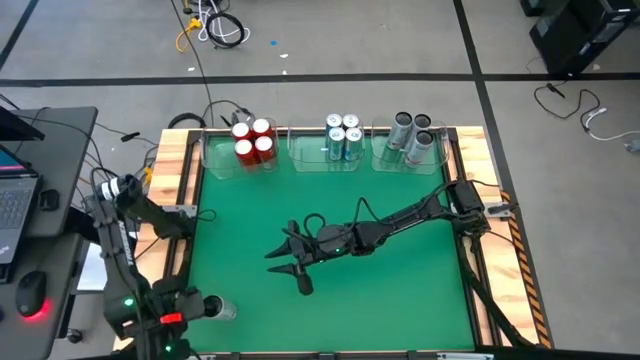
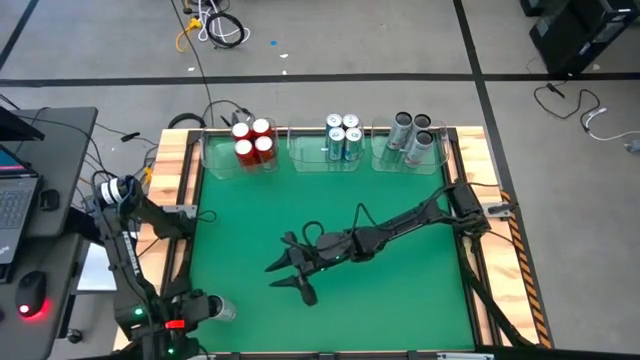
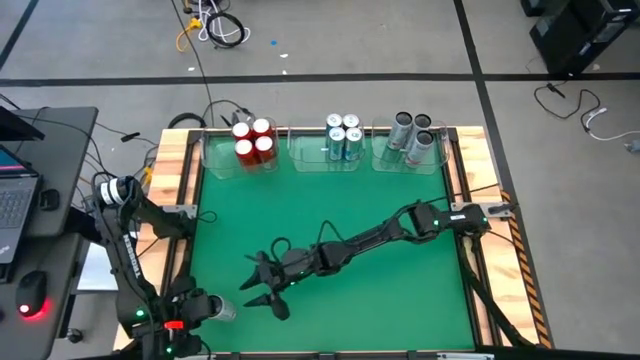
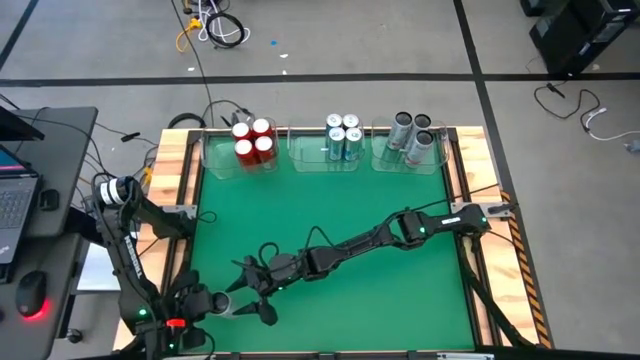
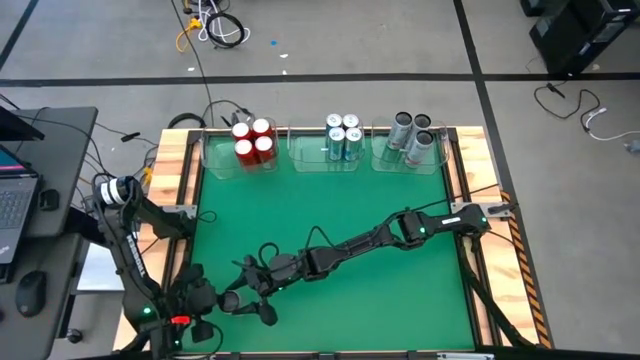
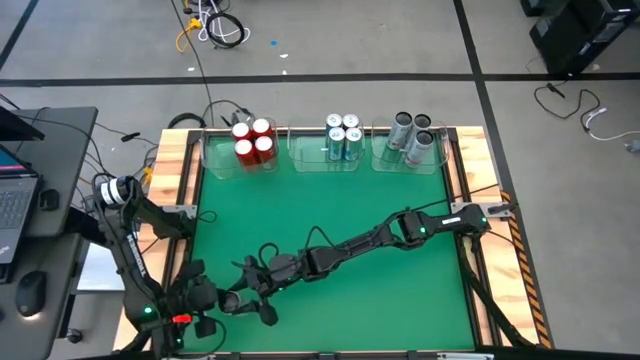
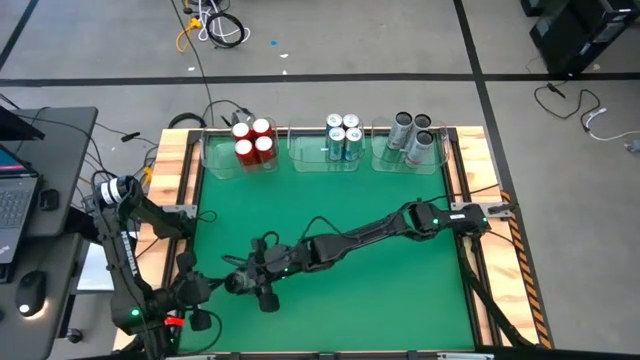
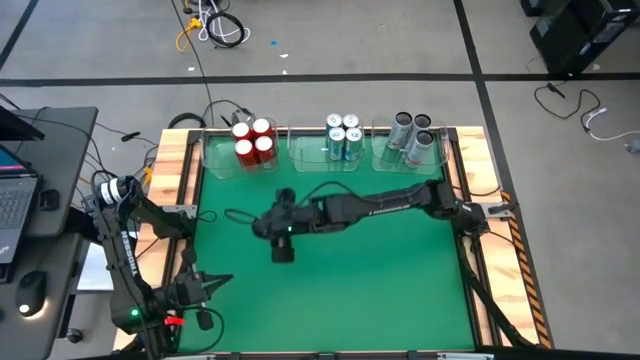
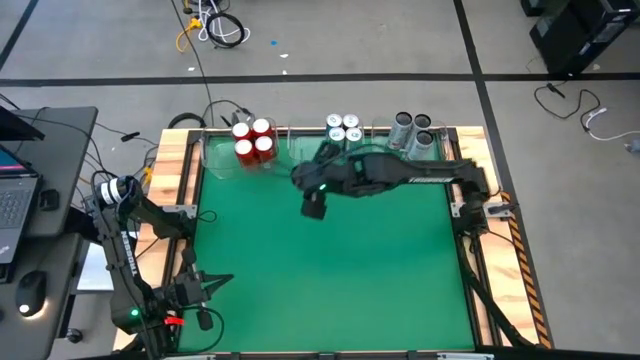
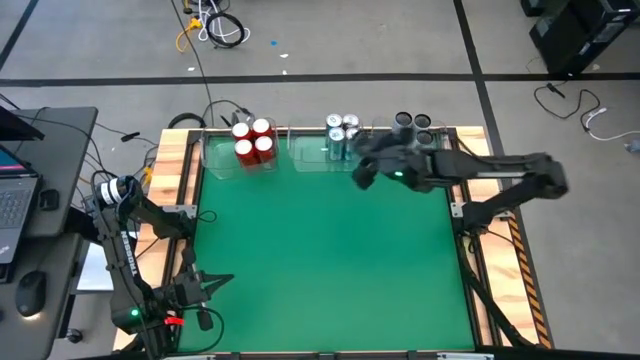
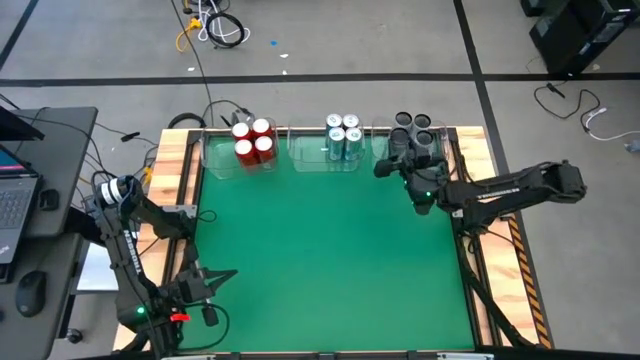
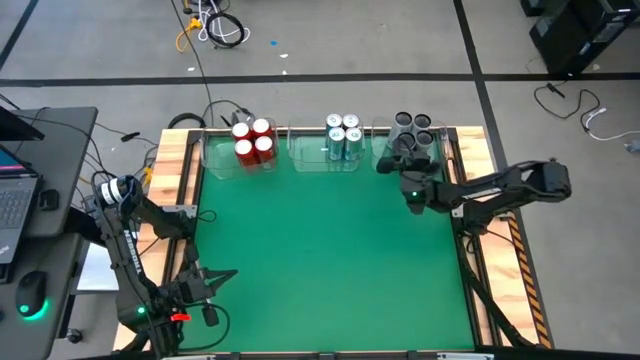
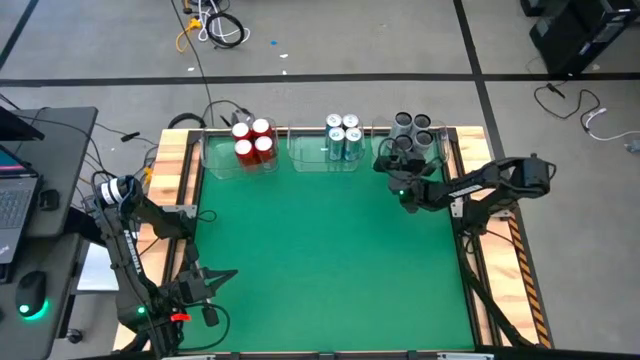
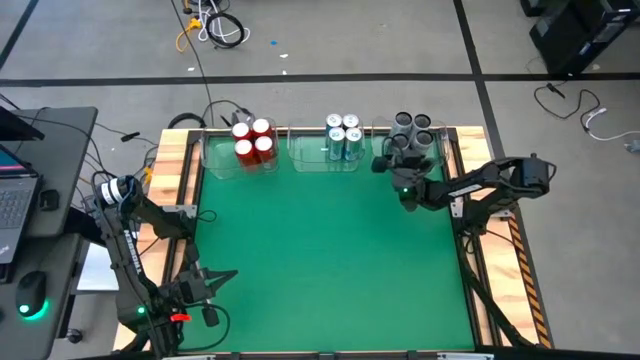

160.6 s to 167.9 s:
Task: Sort soda cans
Put the white soda can into the transparent right bin

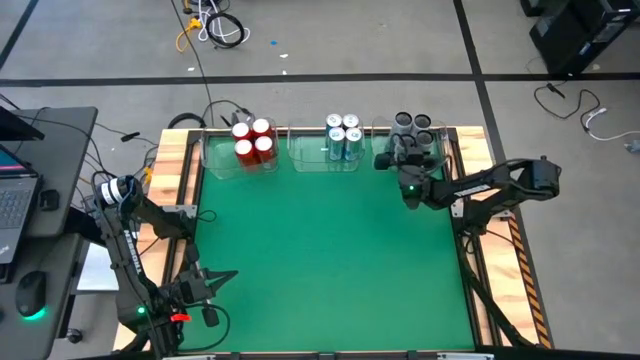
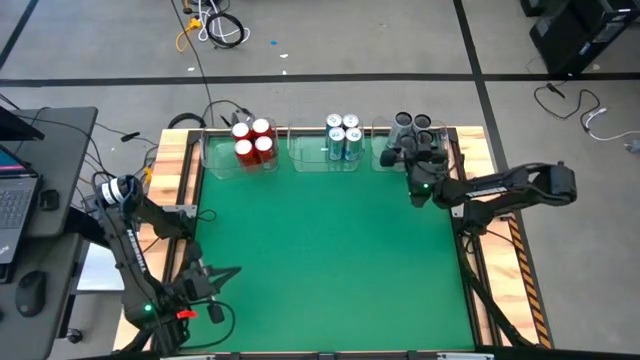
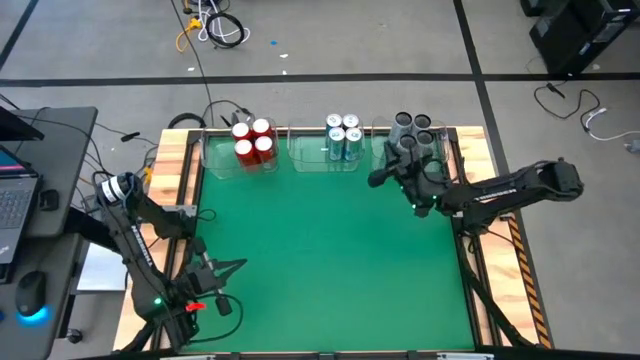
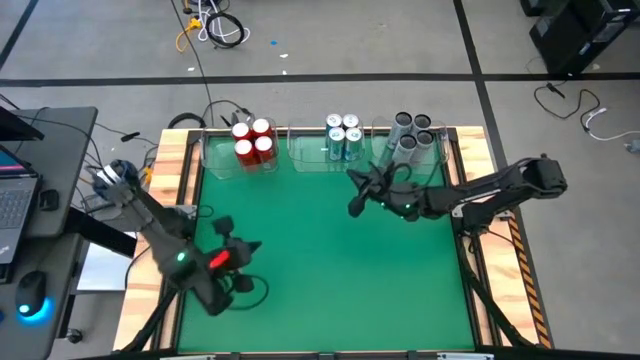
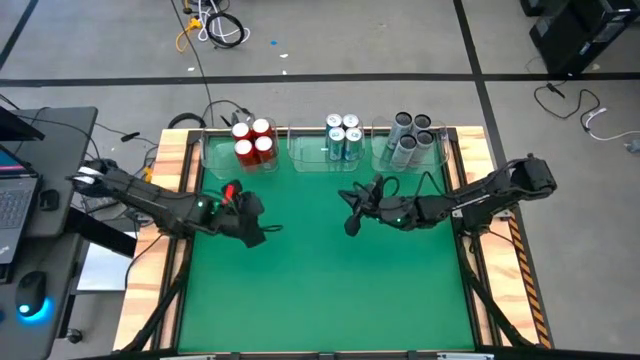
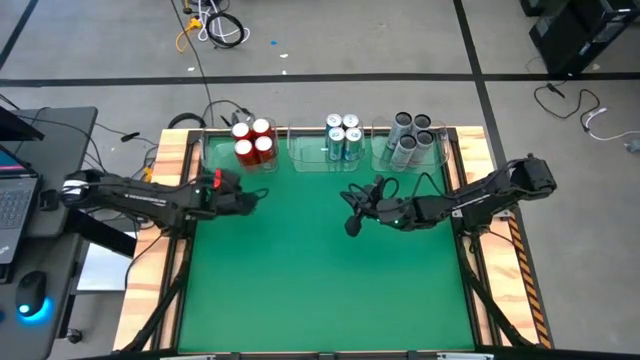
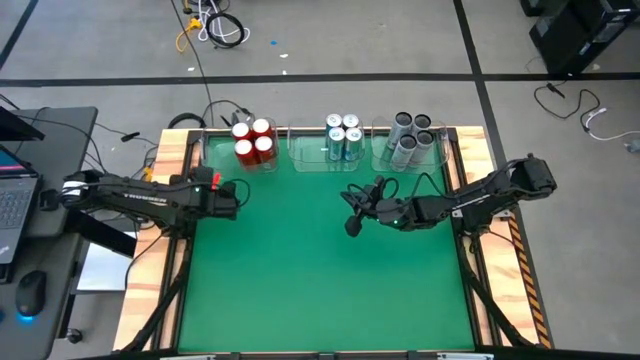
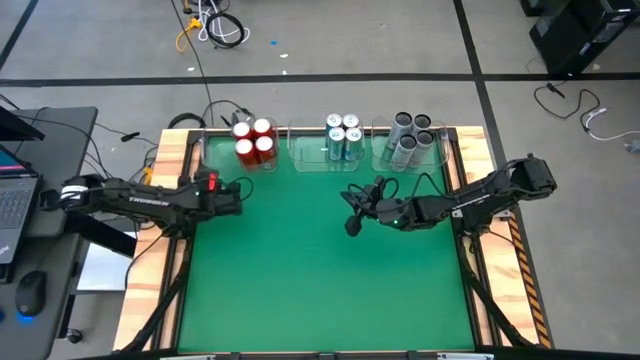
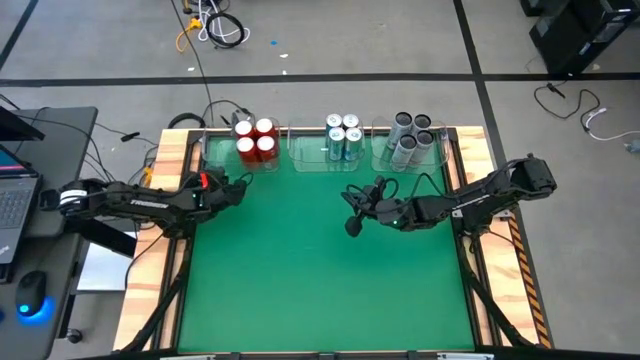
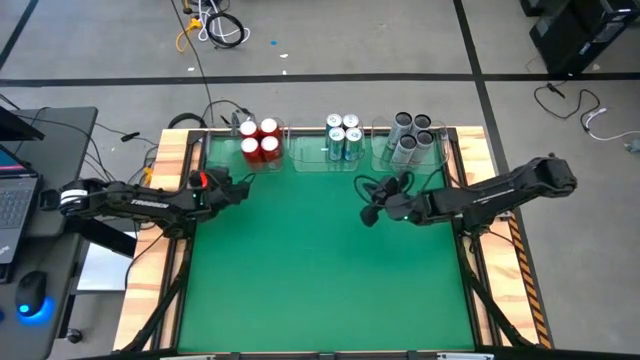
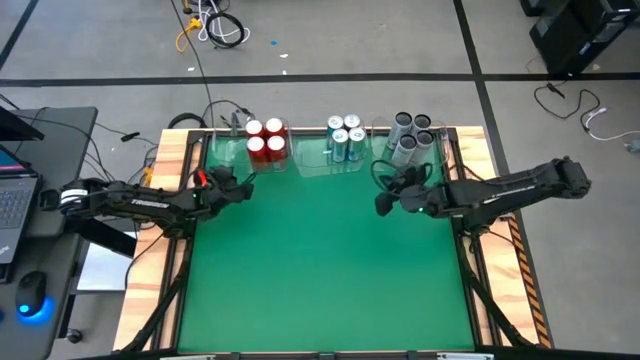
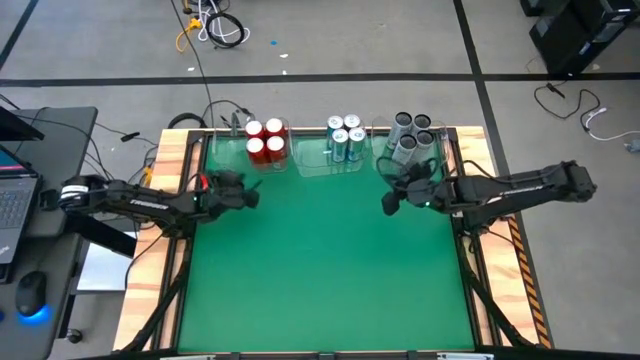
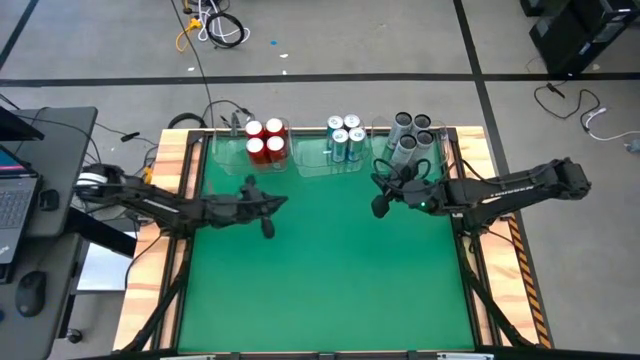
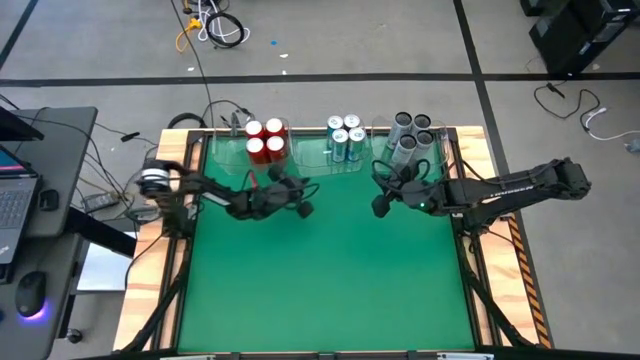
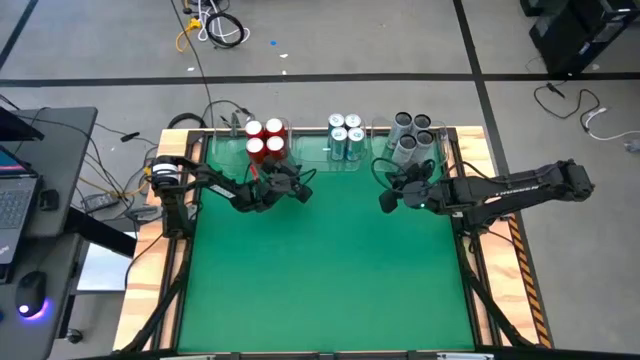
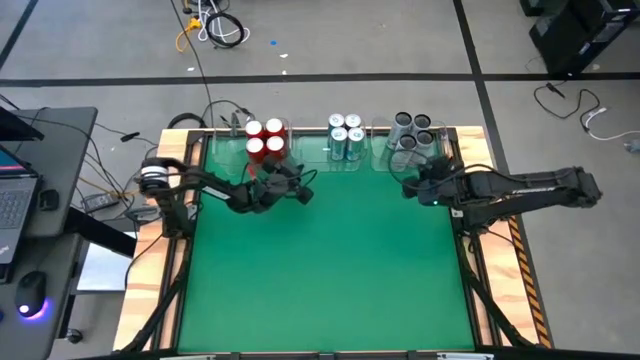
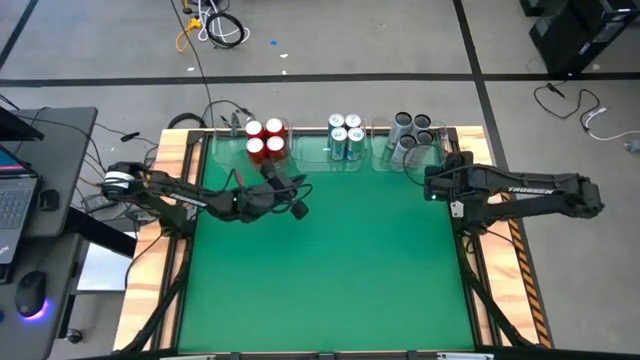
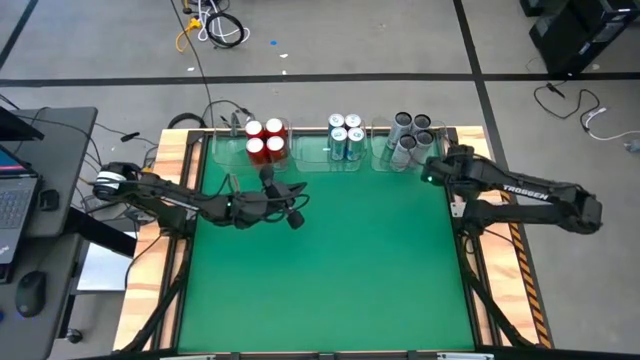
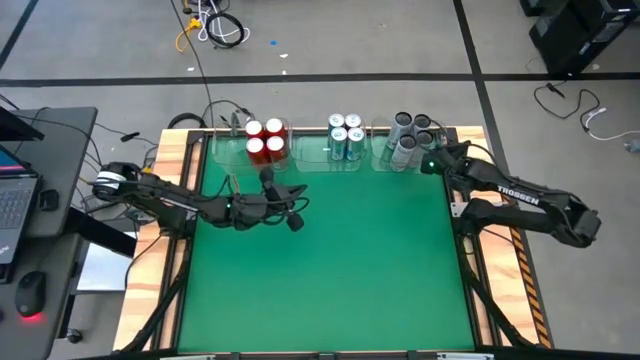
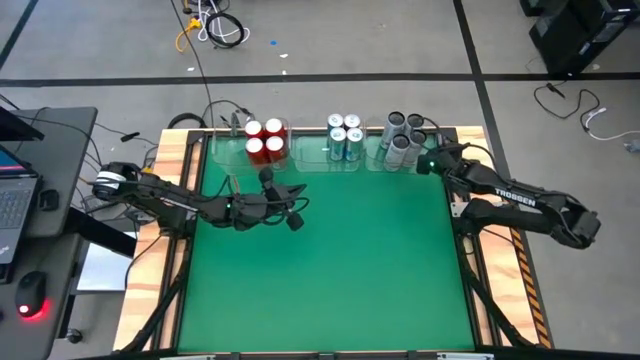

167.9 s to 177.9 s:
Adjust the transparent bins on the table

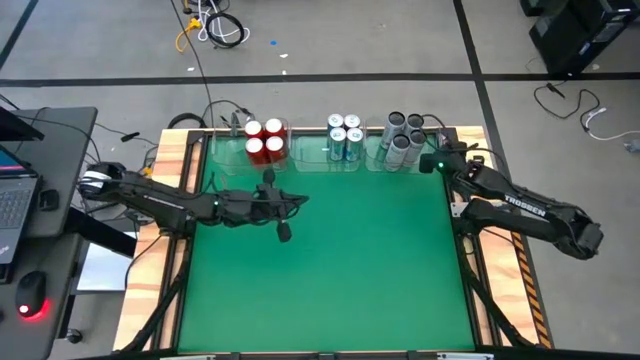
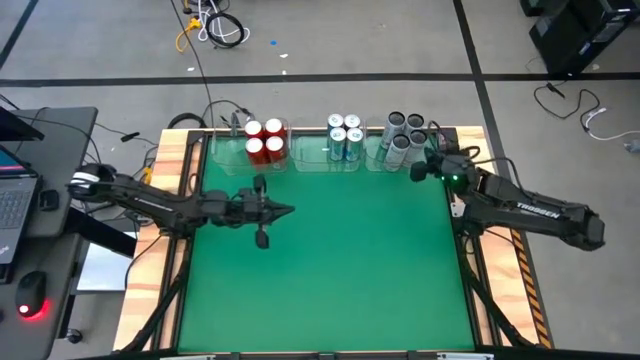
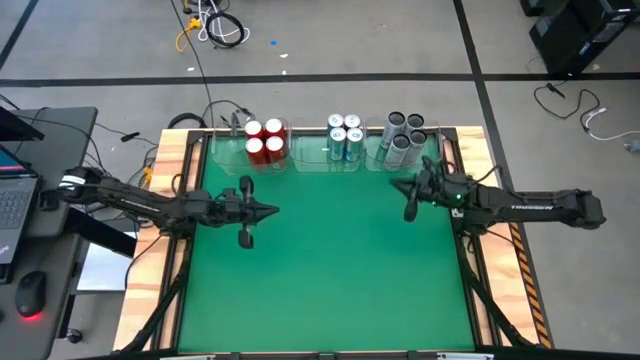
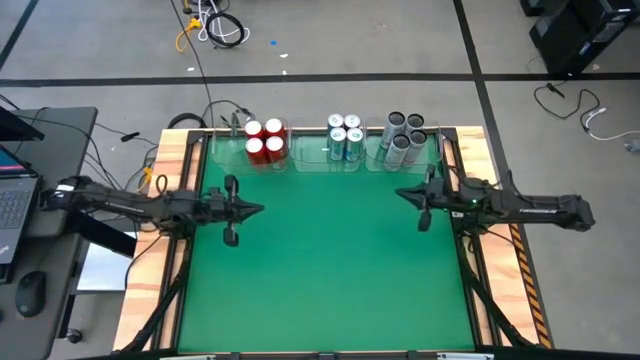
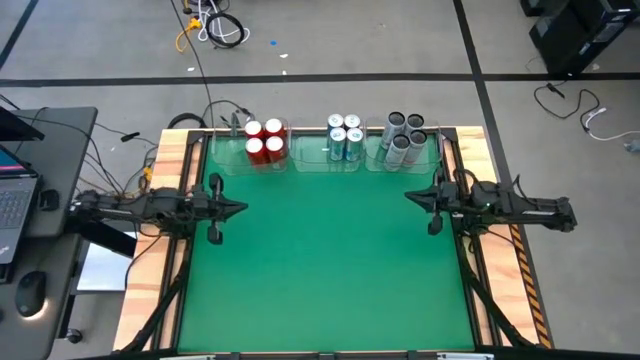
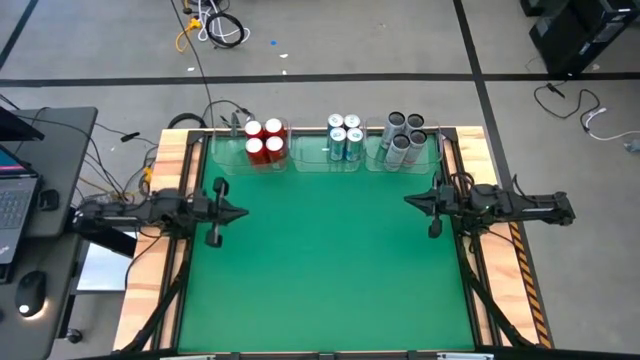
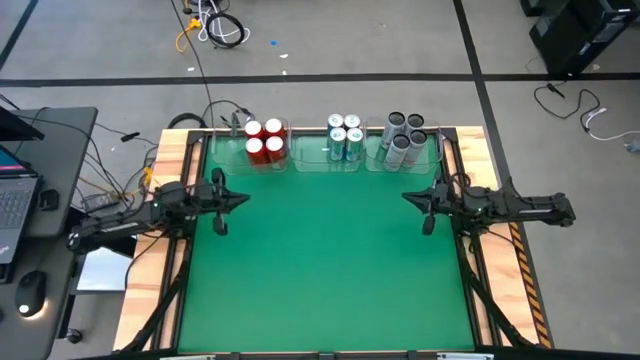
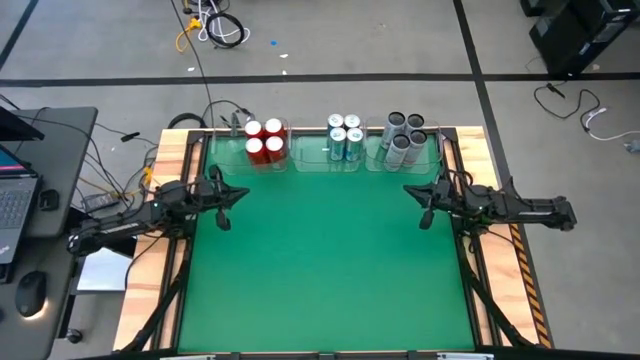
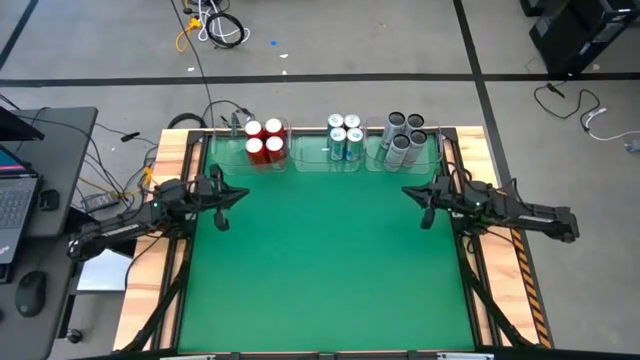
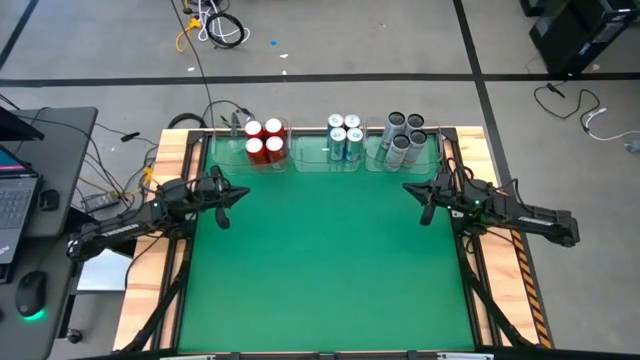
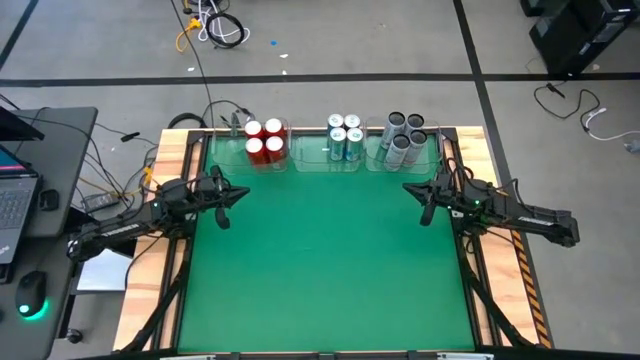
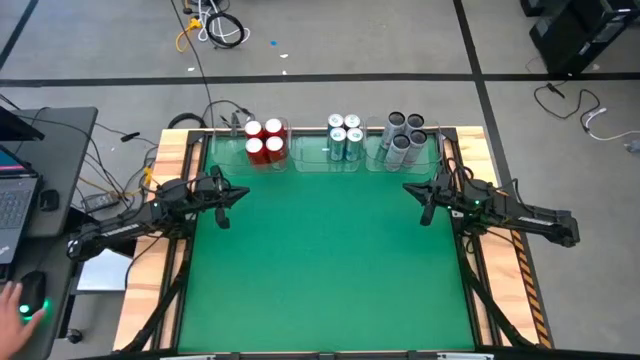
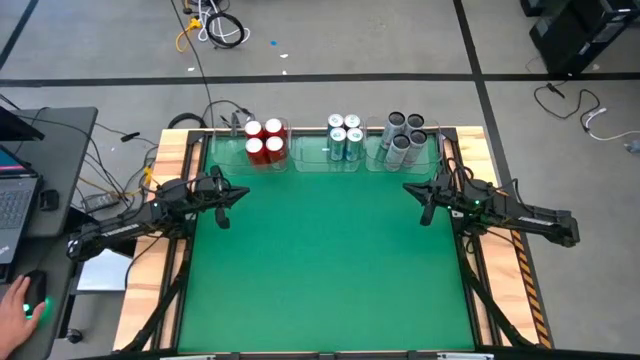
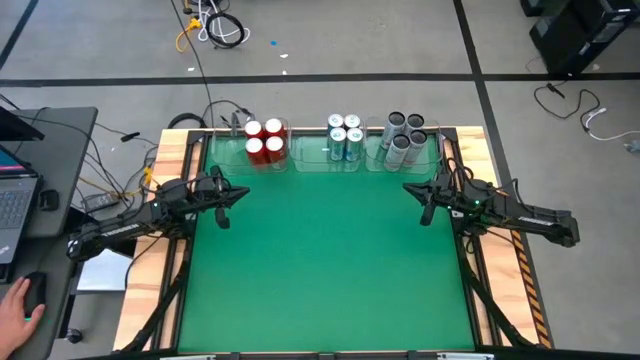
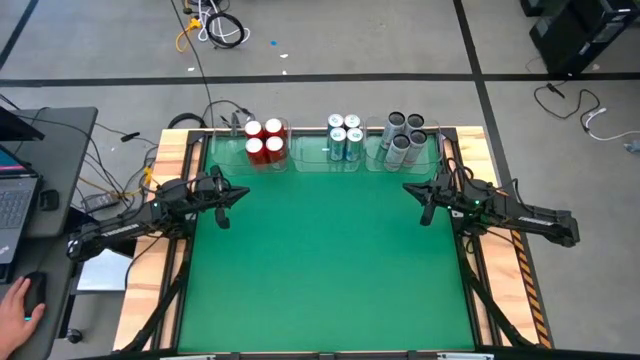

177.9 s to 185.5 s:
Return to Home Position
